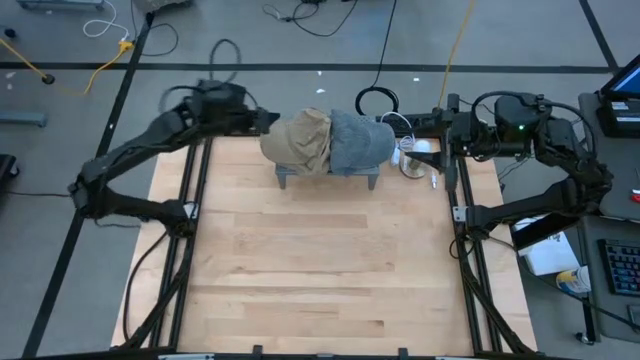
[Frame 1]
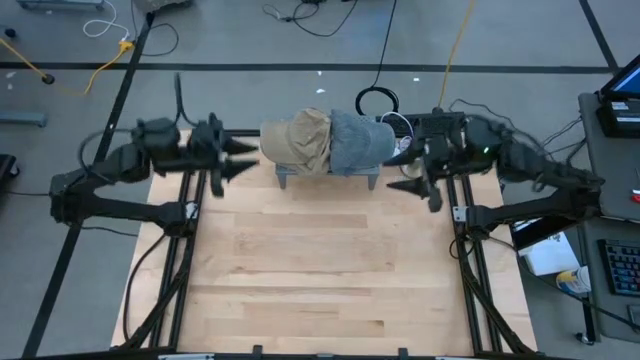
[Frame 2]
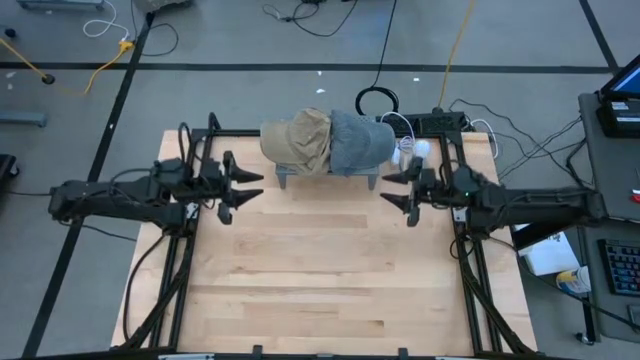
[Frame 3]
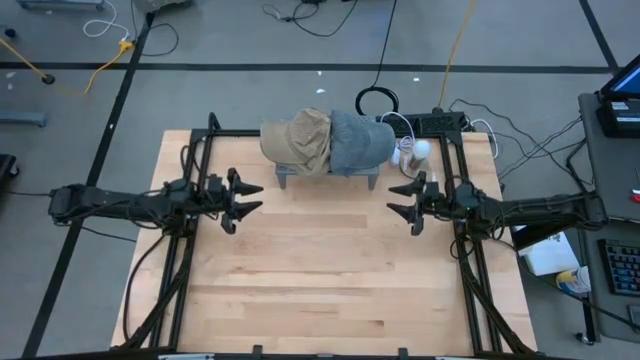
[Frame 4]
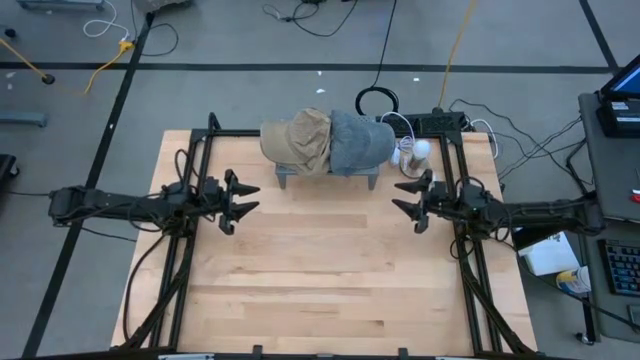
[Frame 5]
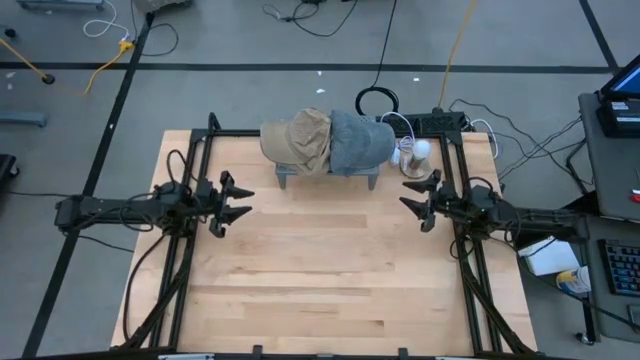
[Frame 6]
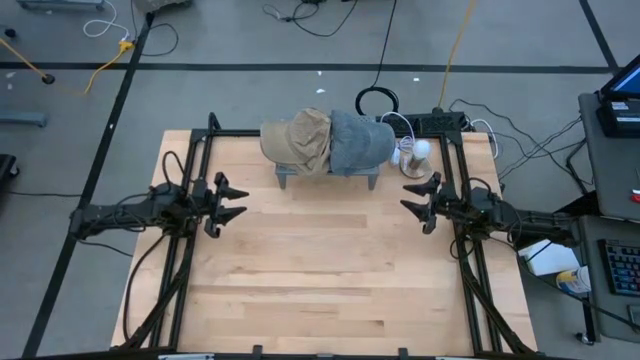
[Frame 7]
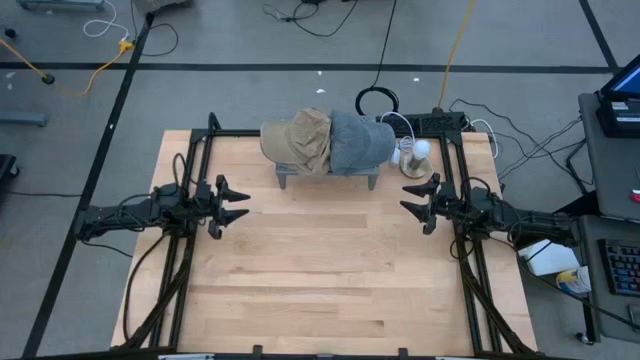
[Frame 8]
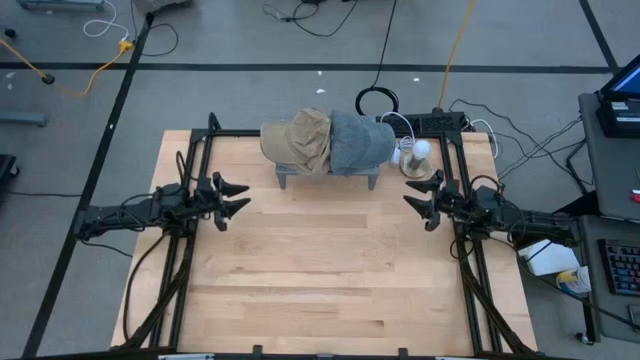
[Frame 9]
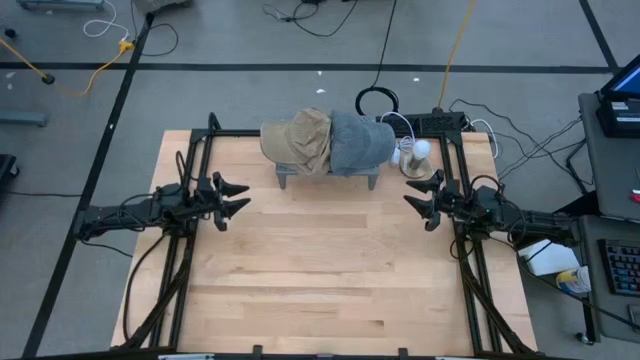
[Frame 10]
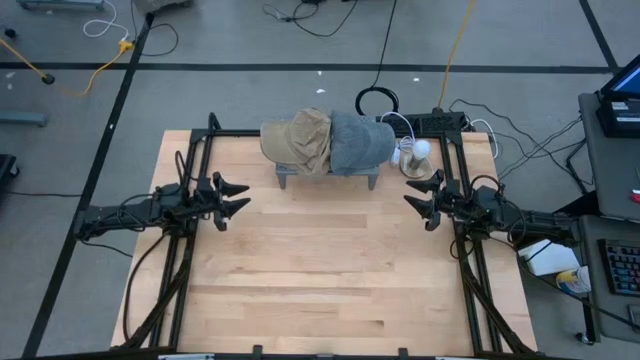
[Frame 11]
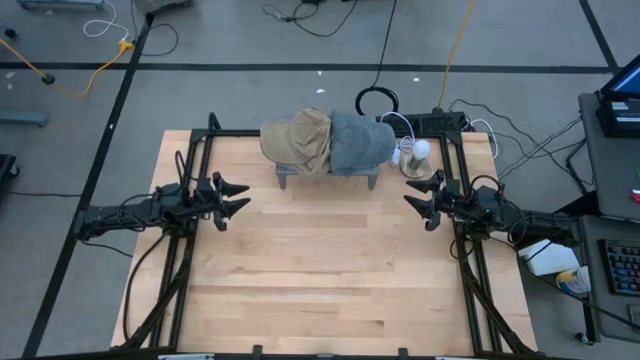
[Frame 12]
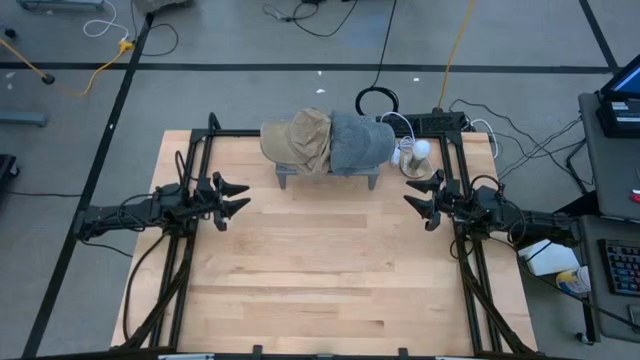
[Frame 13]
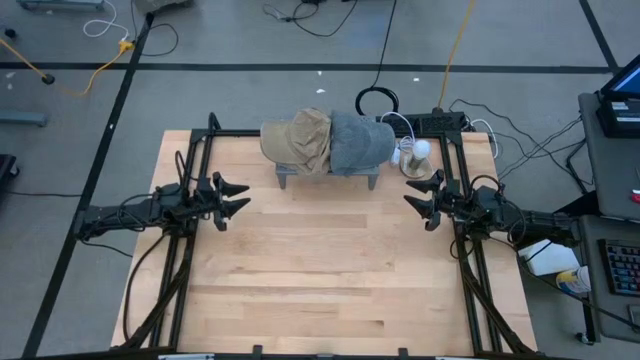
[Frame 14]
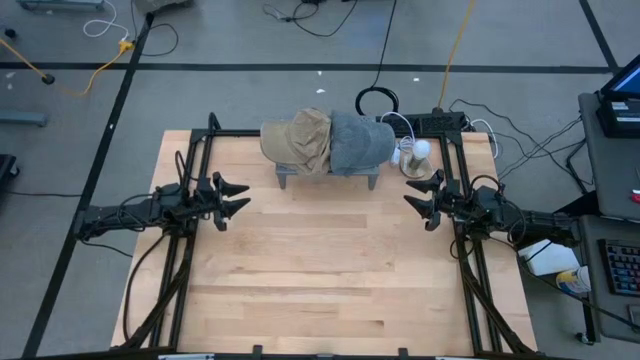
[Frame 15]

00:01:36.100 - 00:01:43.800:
Task: Pick & Place hat
Return to Home Position

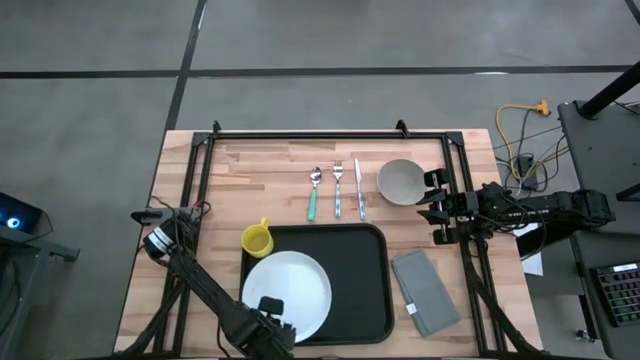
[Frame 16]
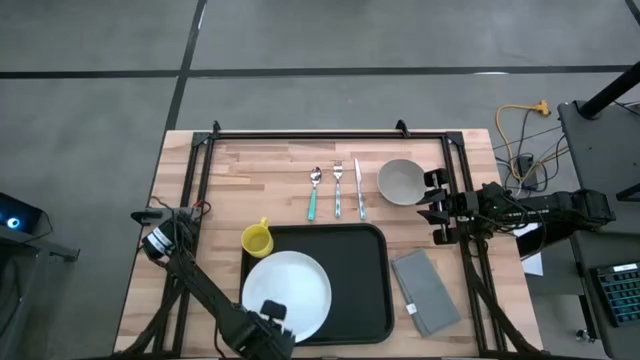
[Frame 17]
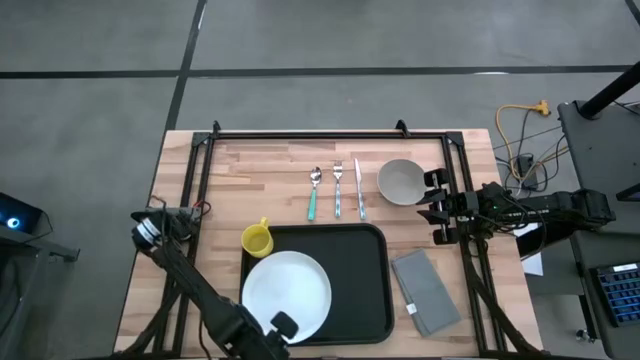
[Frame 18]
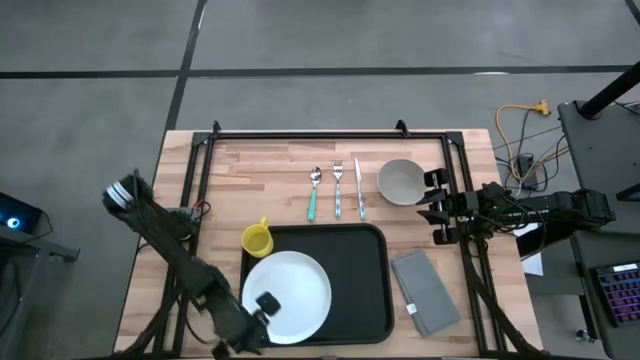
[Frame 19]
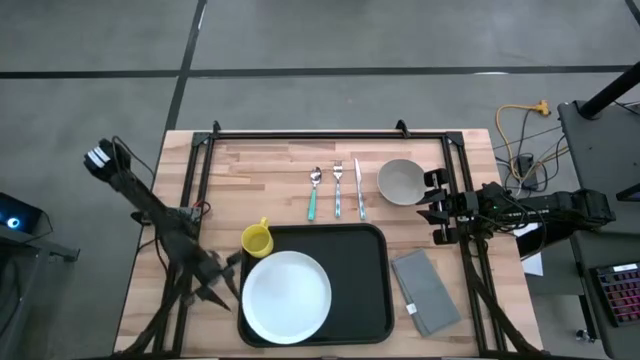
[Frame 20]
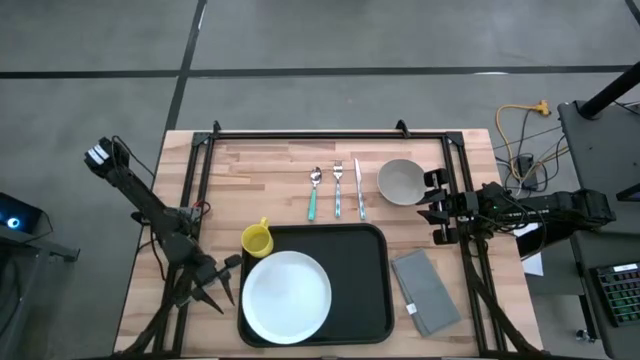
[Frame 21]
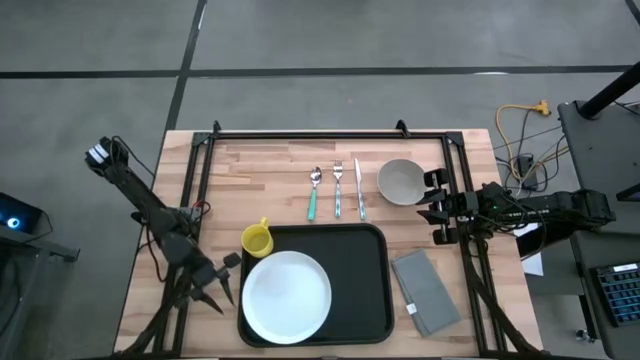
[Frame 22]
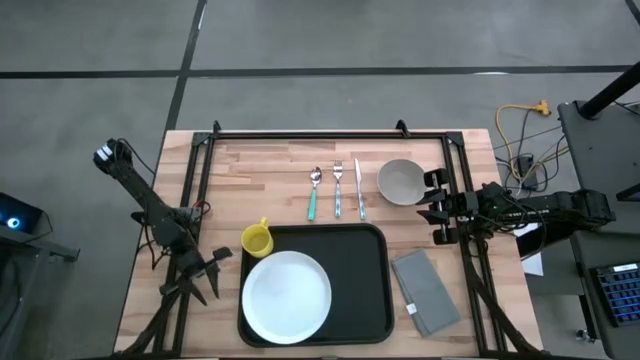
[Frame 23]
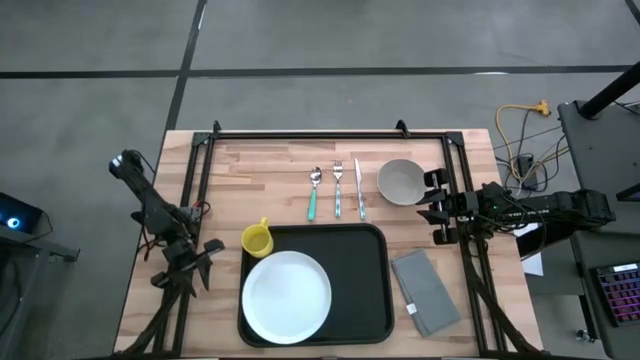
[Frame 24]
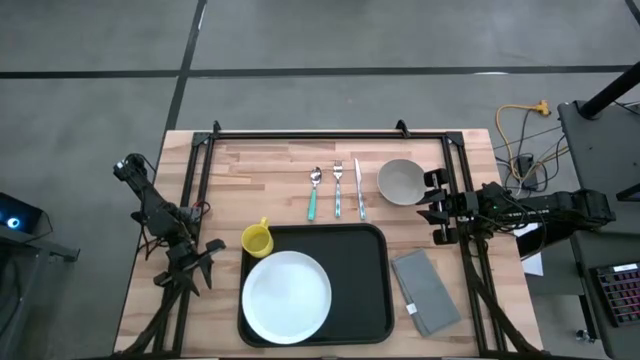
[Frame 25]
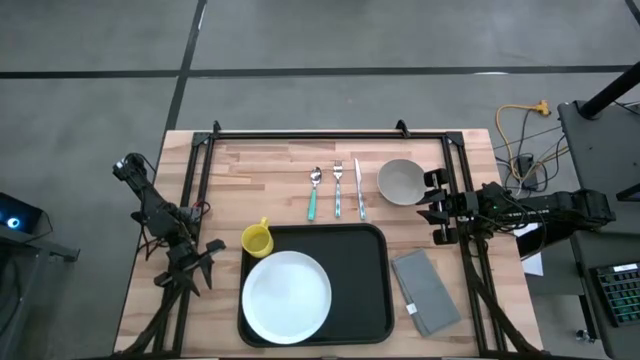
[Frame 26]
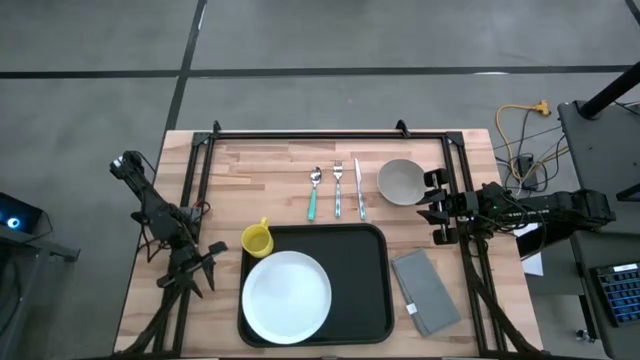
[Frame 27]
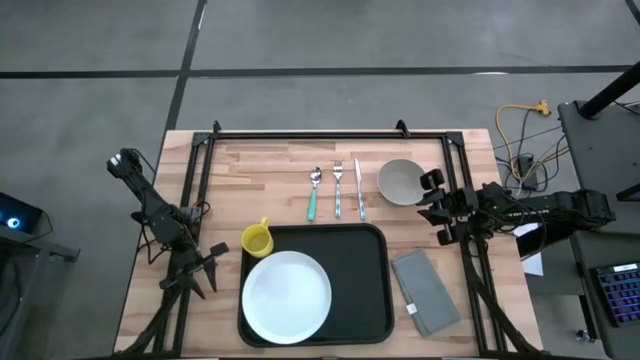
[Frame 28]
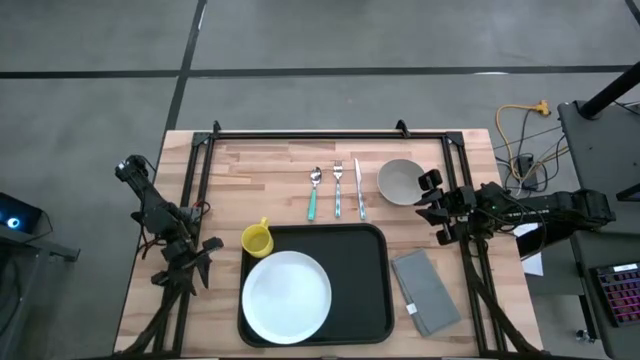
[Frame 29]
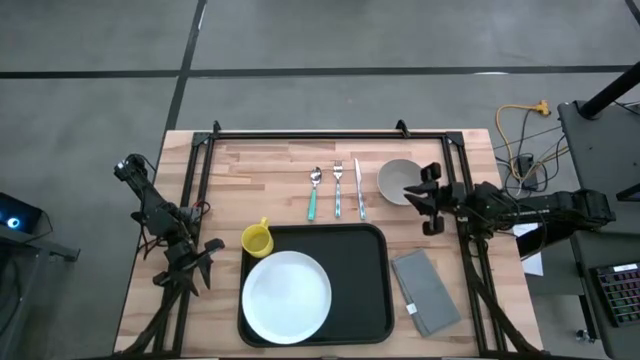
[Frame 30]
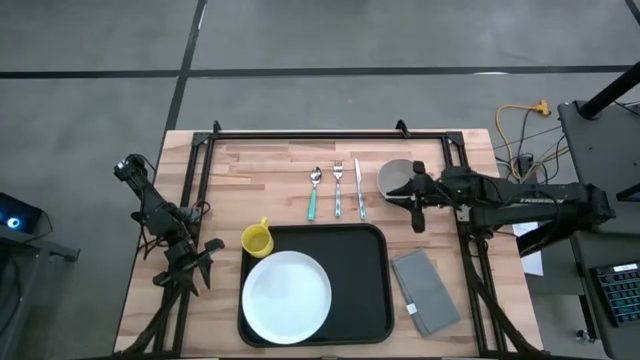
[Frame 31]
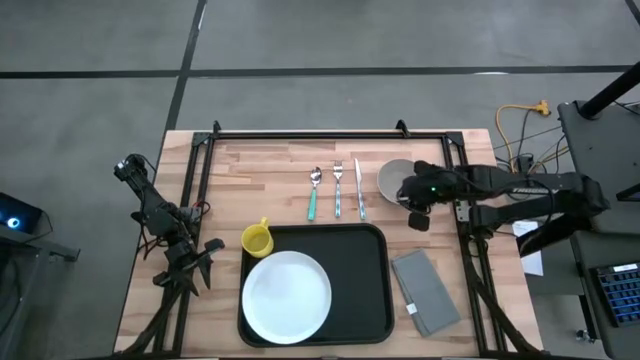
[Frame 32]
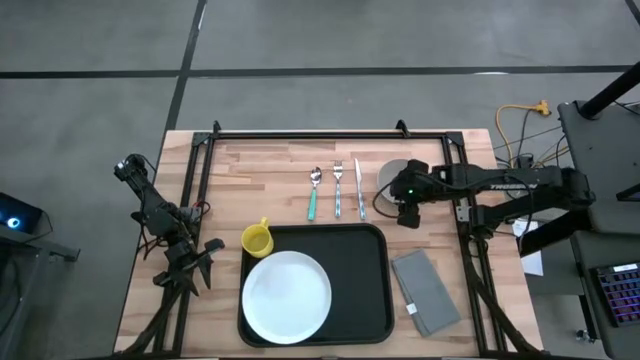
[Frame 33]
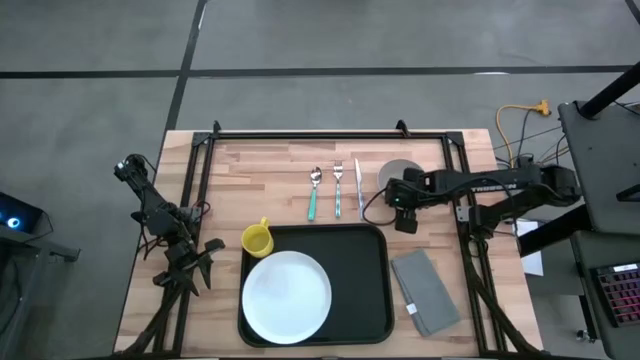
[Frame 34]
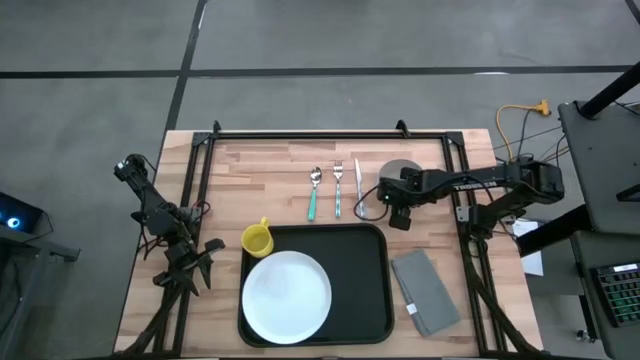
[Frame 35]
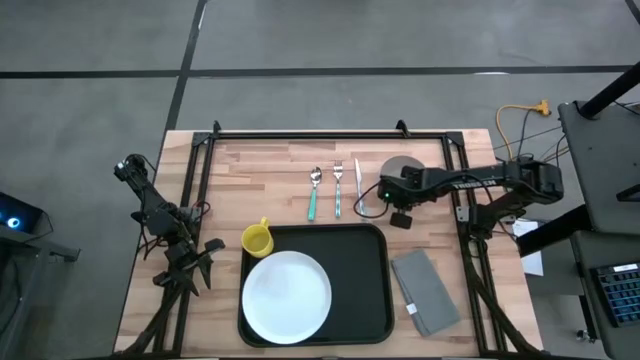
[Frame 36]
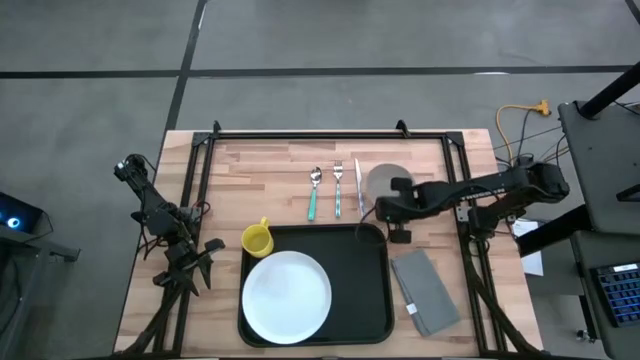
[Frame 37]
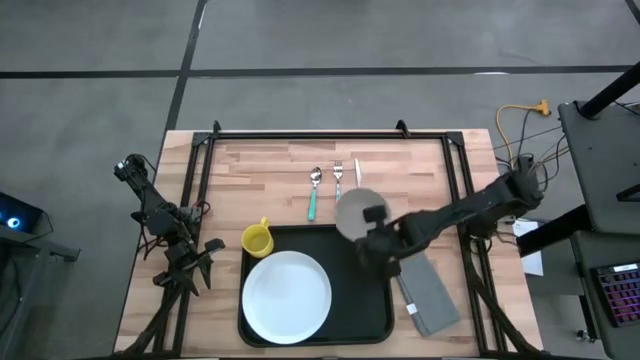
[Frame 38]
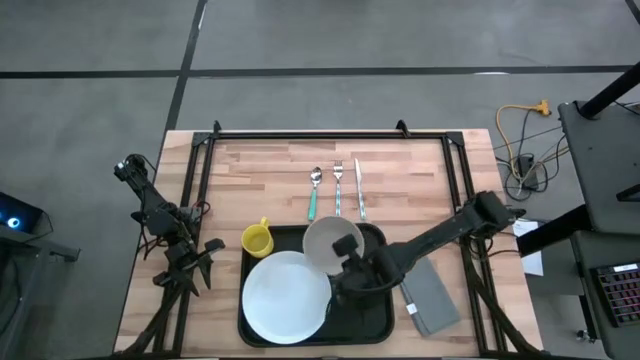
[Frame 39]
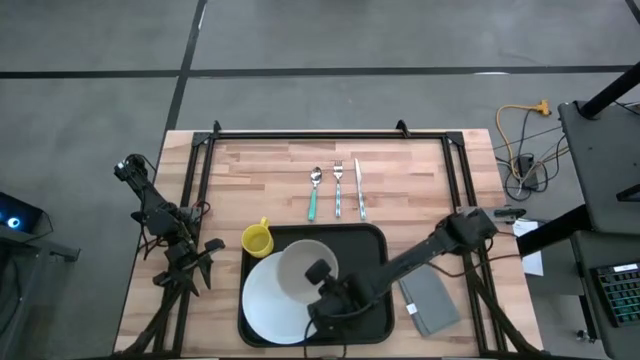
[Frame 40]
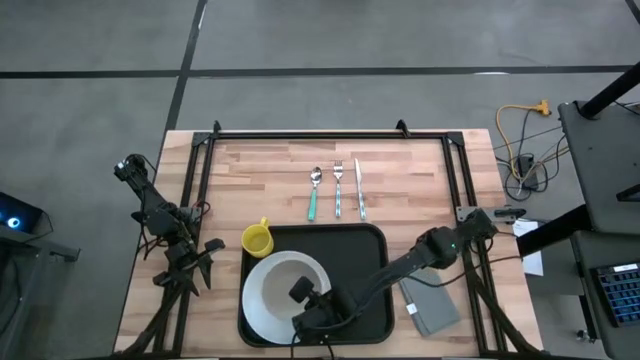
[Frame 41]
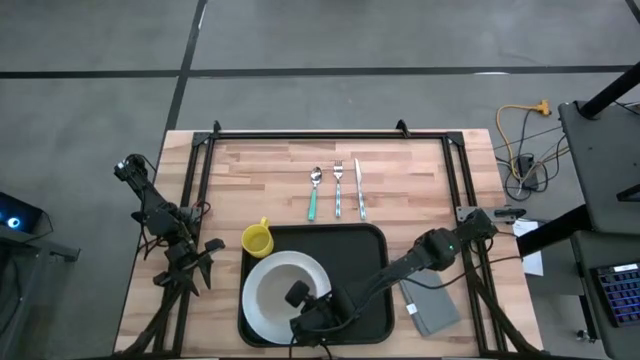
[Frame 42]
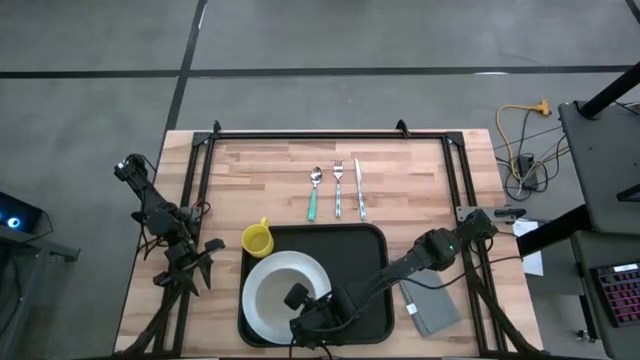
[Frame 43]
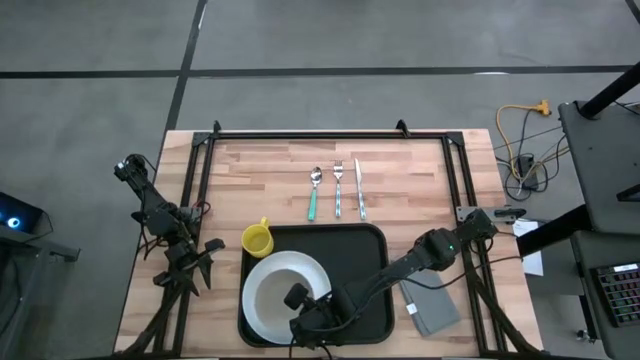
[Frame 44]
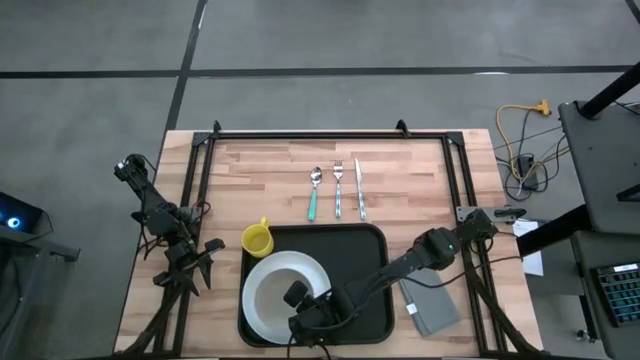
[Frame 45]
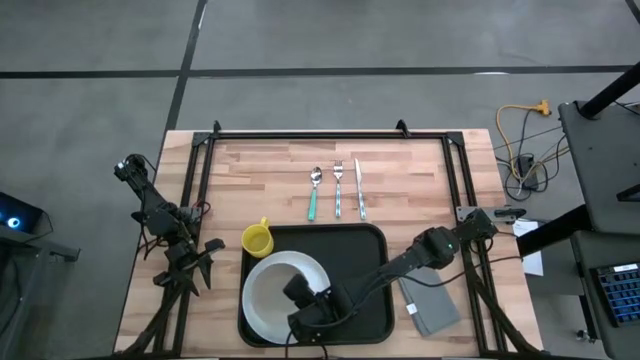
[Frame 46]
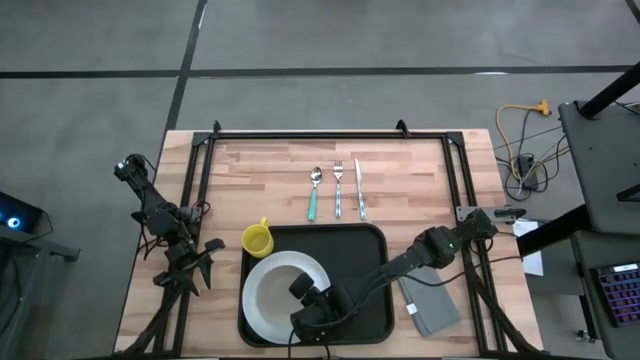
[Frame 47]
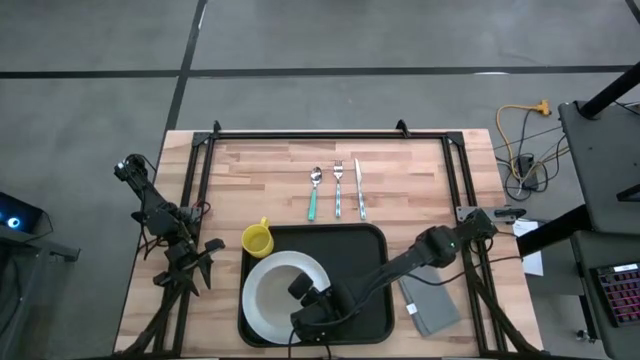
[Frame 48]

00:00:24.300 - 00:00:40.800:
Task: Set up tray
Put the gray bowl on the white plate
